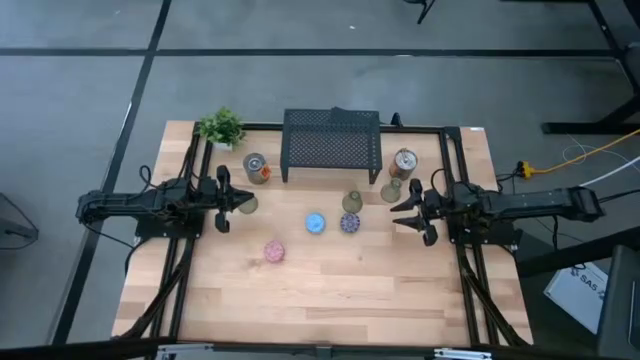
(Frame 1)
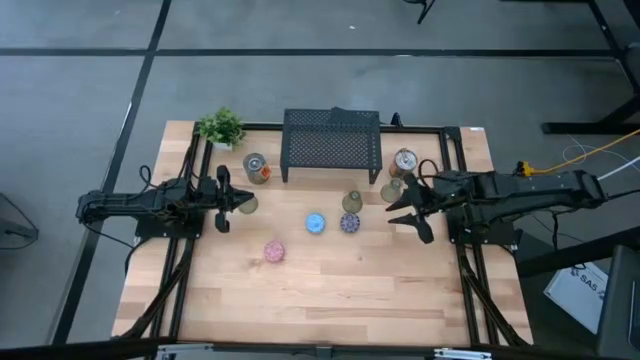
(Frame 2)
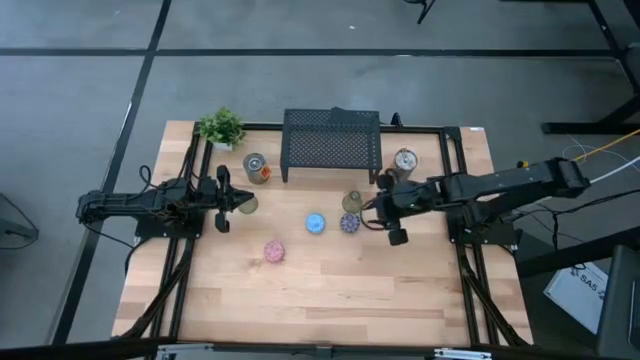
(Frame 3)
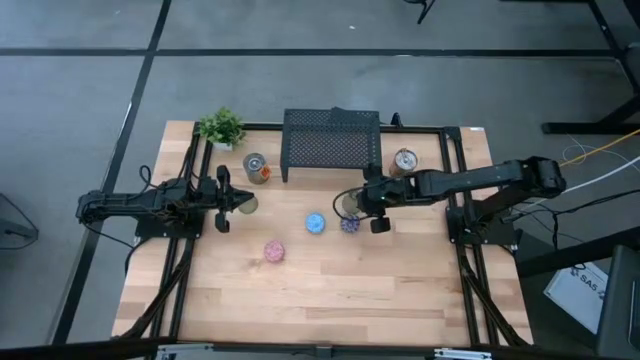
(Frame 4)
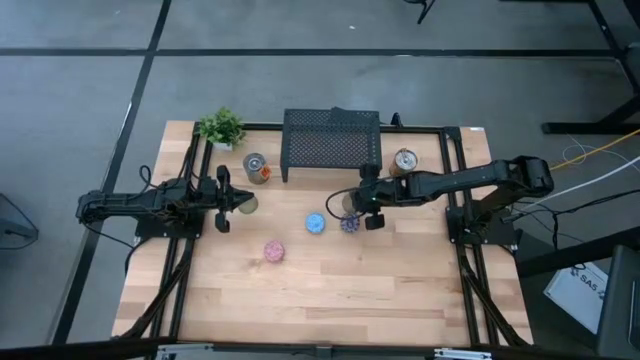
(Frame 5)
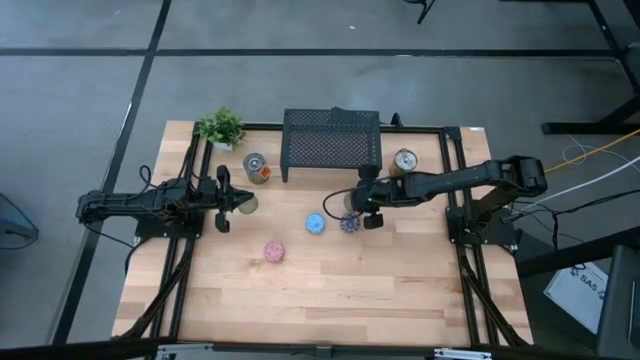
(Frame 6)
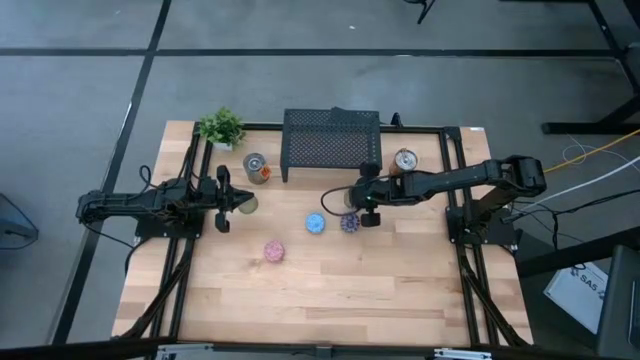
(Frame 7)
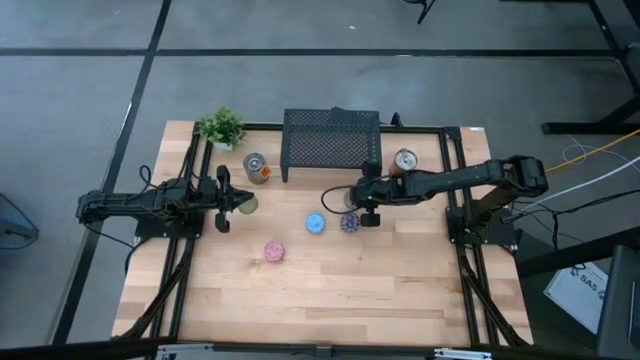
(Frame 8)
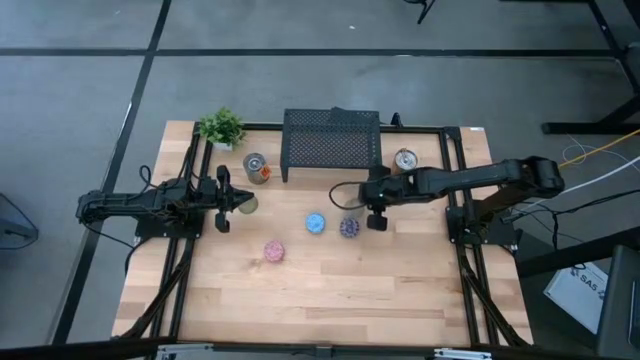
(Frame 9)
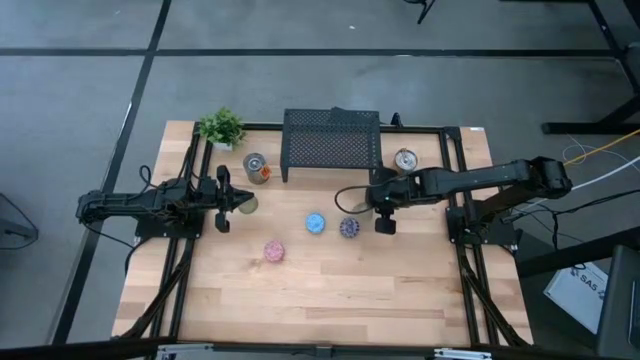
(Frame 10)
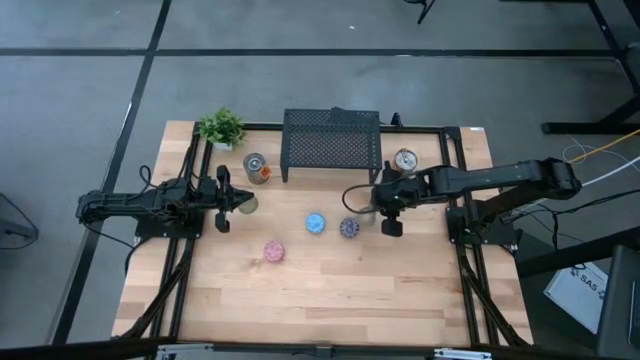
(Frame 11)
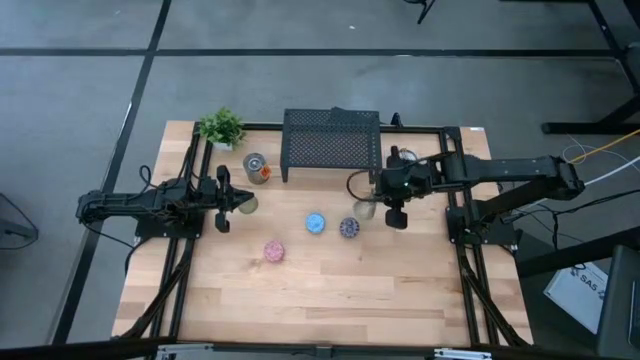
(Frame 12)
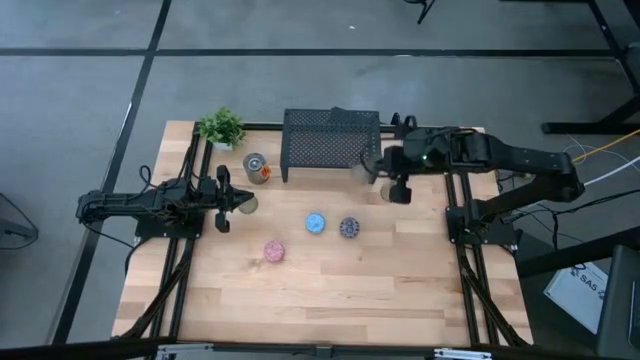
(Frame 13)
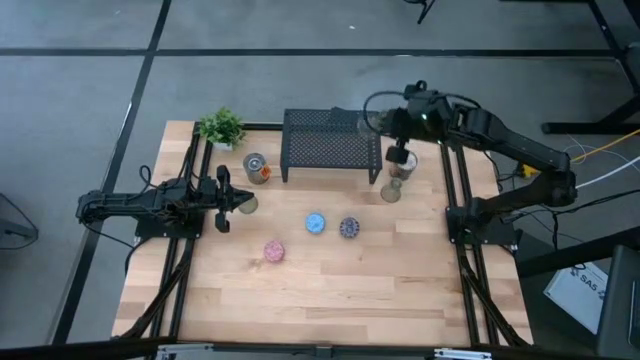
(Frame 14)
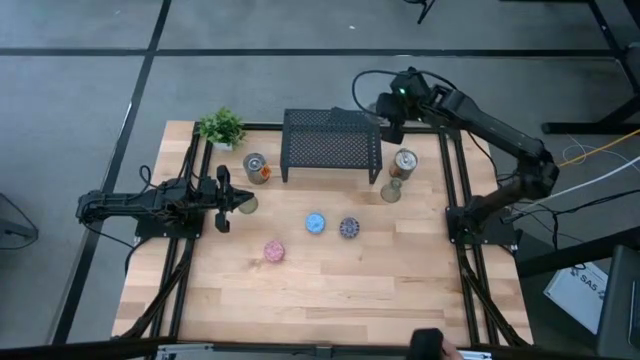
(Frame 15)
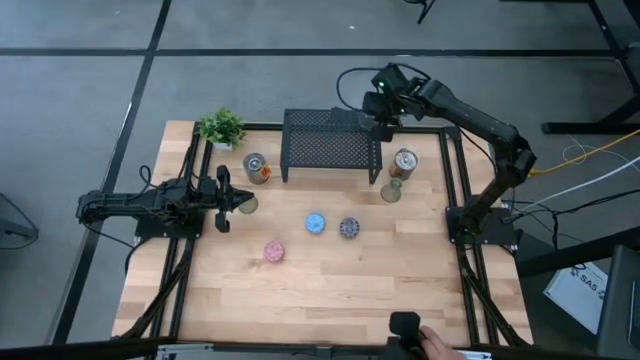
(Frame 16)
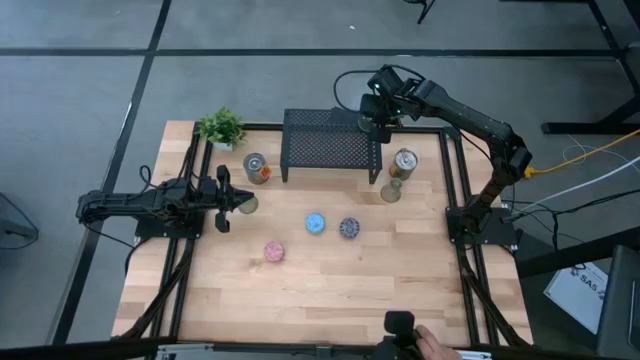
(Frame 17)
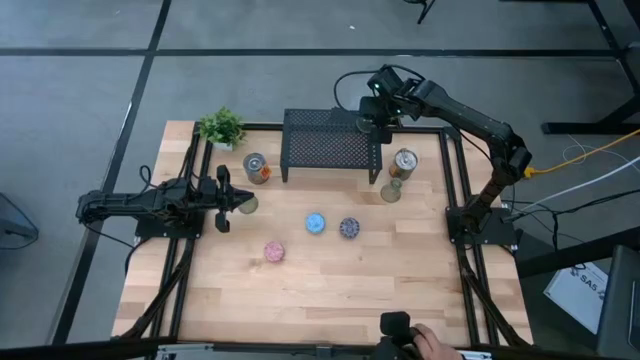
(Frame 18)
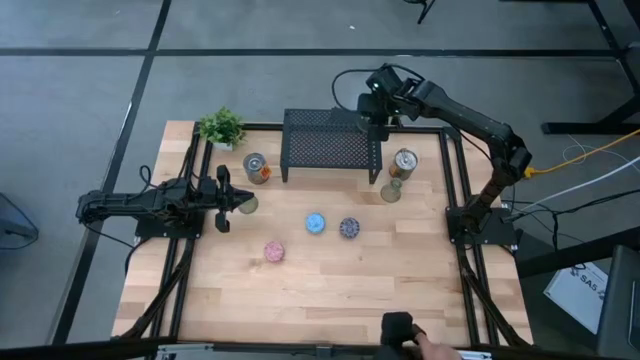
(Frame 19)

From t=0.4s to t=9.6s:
Task: Pick & Place candle stick holders
Put the middle green glass candle holder on the shelf

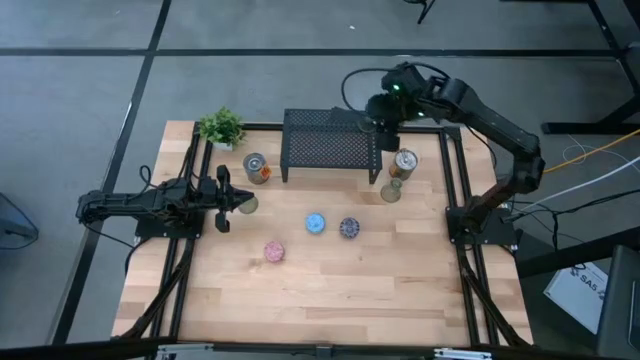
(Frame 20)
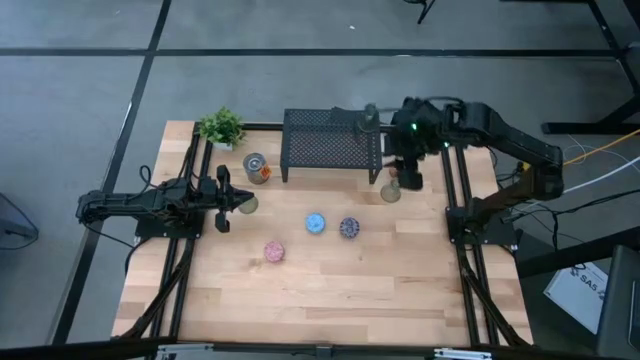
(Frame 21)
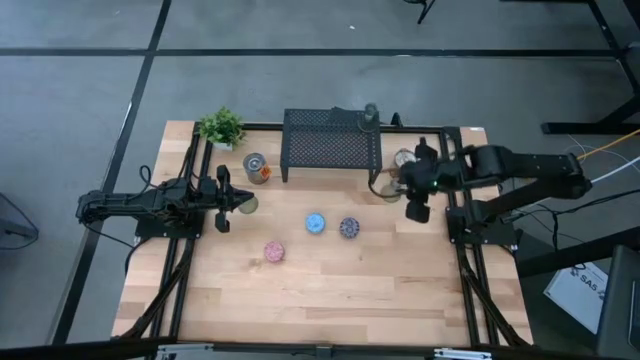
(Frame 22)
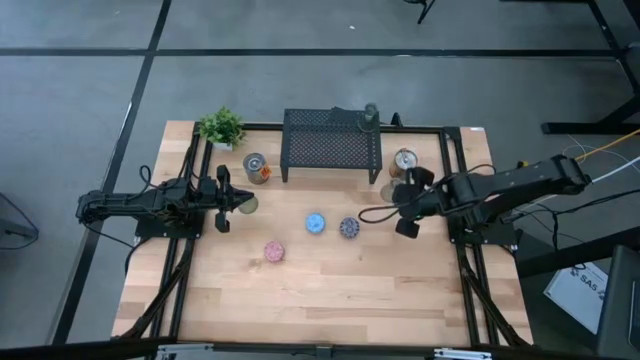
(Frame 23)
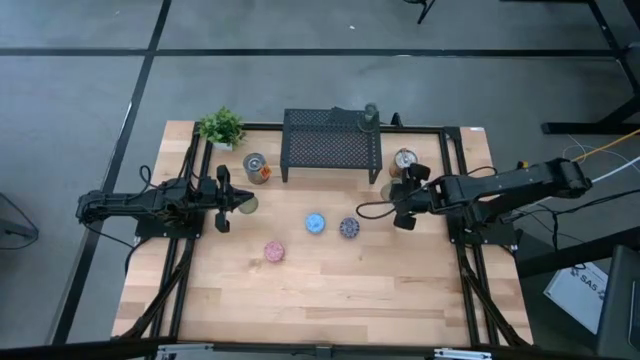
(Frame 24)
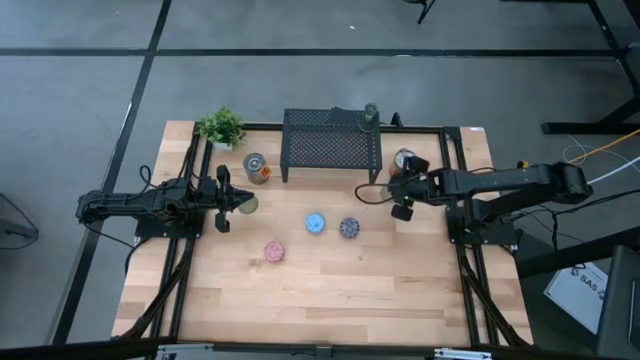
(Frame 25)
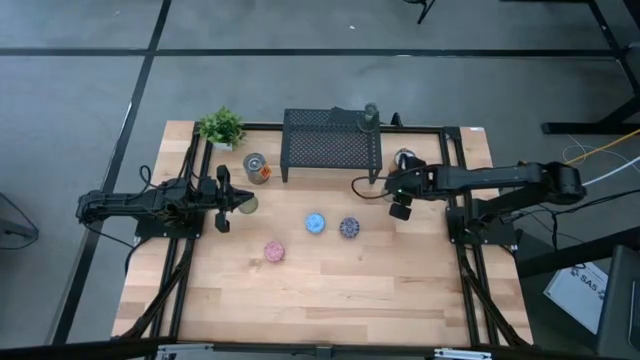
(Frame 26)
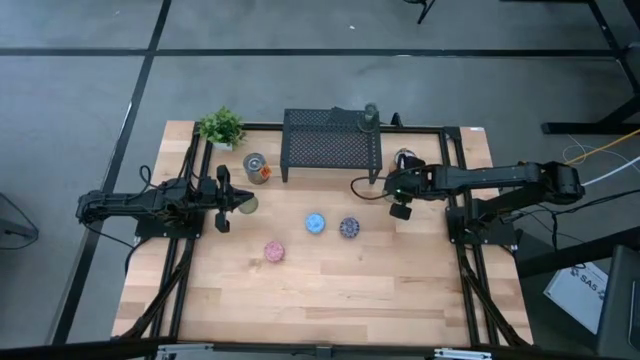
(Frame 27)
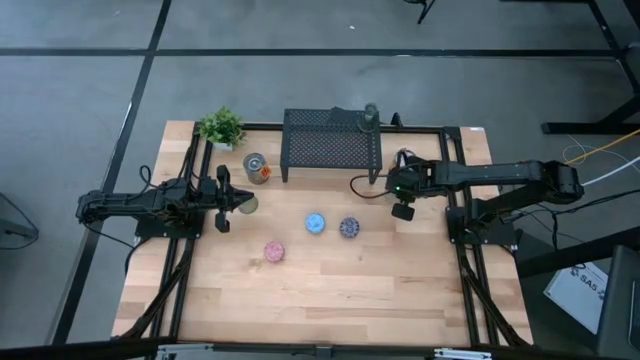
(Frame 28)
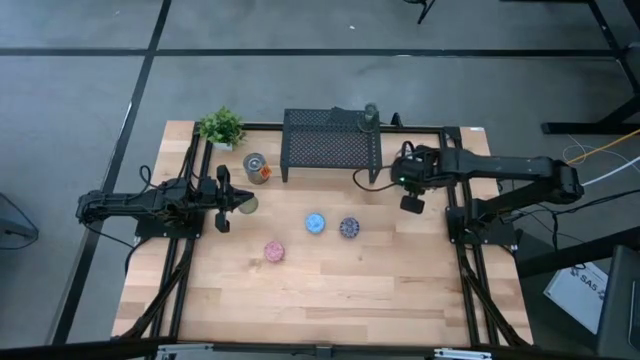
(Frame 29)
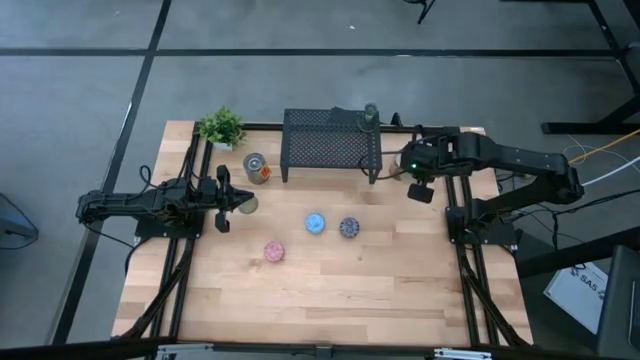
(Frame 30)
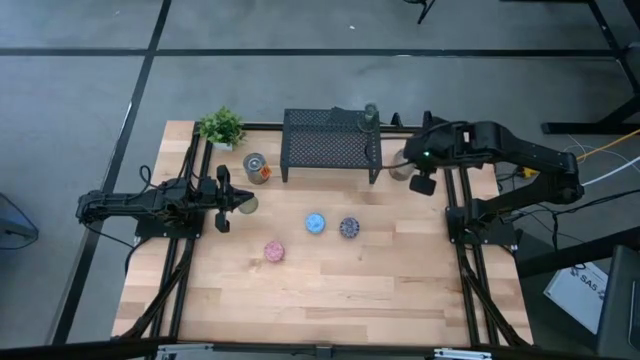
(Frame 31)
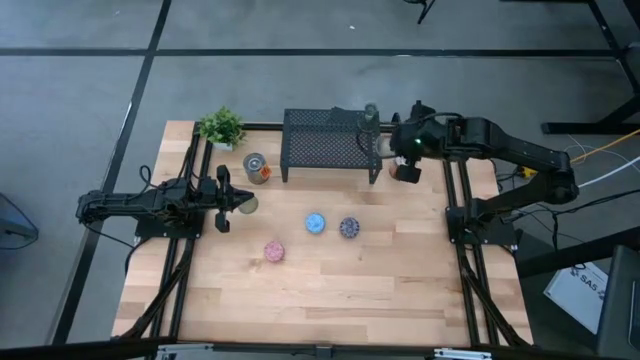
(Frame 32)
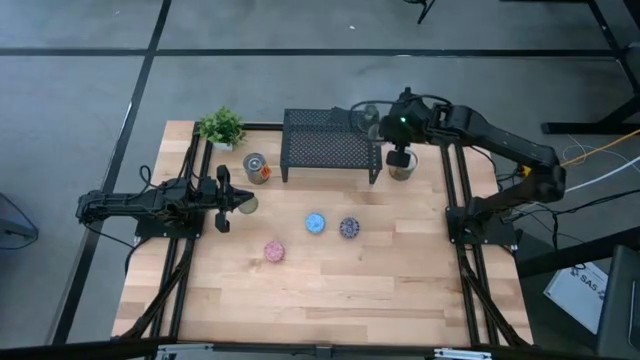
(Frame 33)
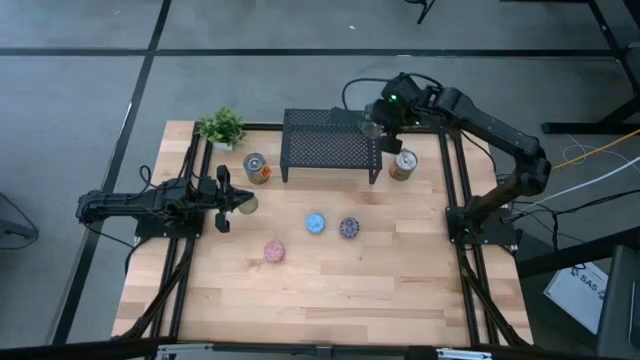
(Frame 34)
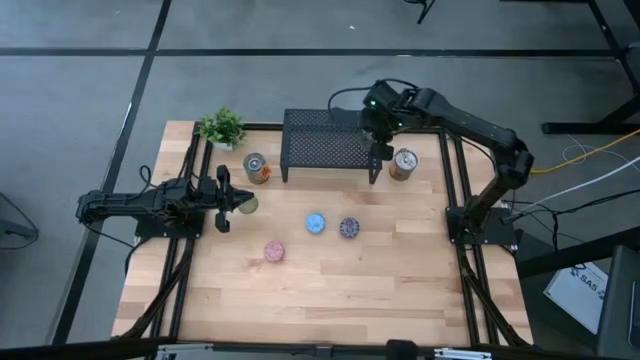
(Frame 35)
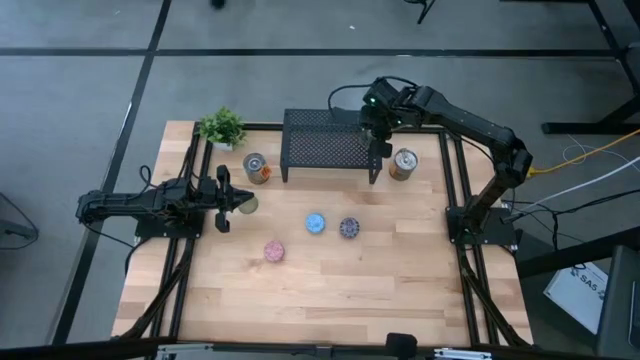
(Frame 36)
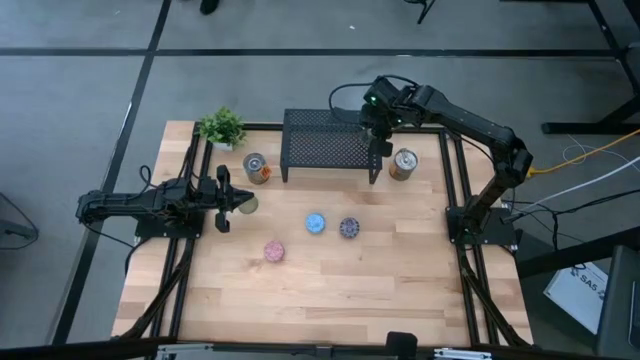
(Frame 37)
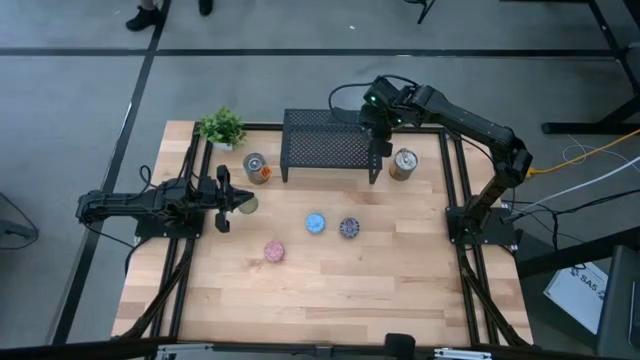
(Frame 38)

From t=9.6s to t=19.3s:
Put the right green glass candle holder on the shelf aligned with the other green glass candle holder
